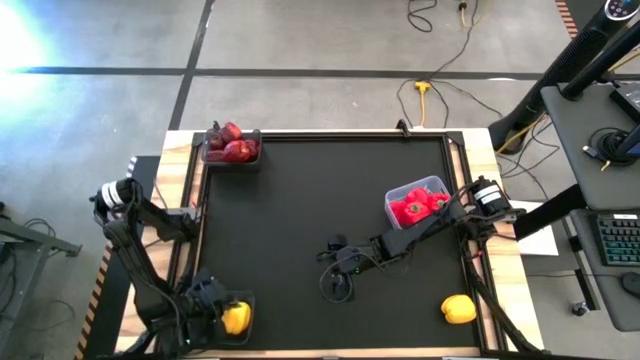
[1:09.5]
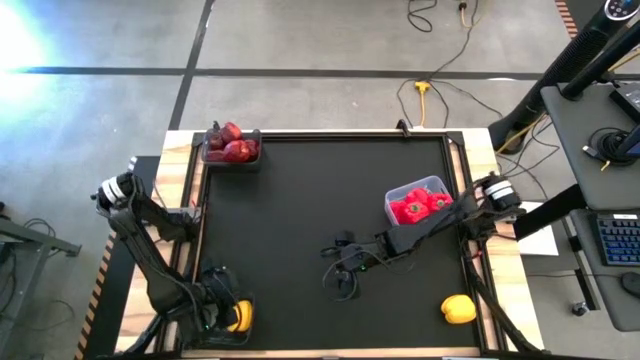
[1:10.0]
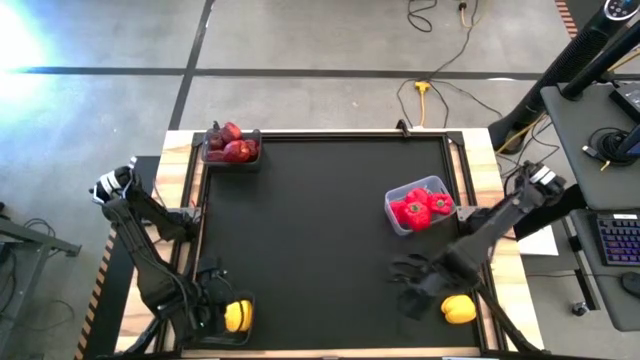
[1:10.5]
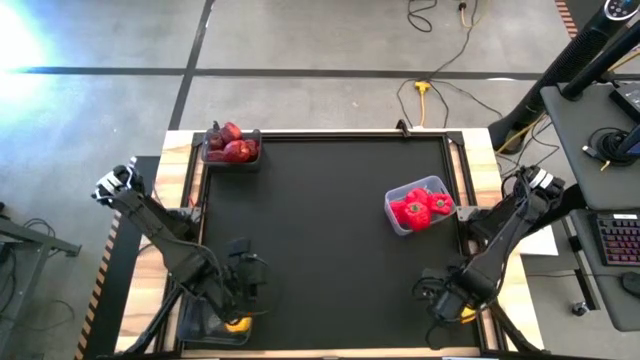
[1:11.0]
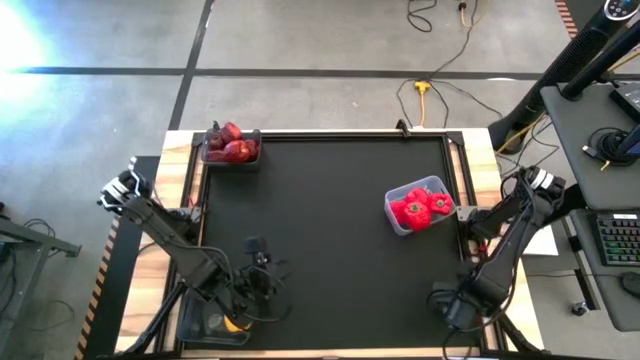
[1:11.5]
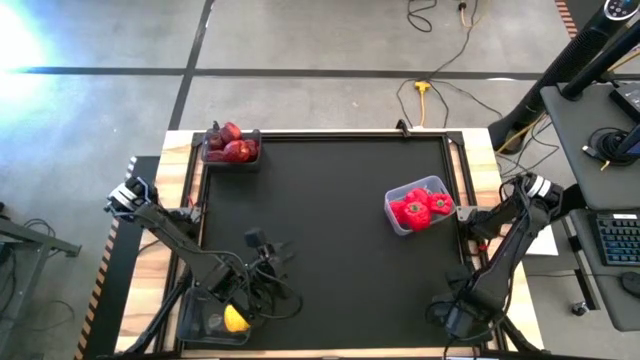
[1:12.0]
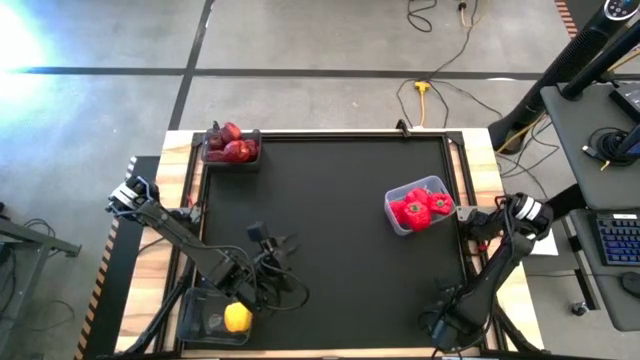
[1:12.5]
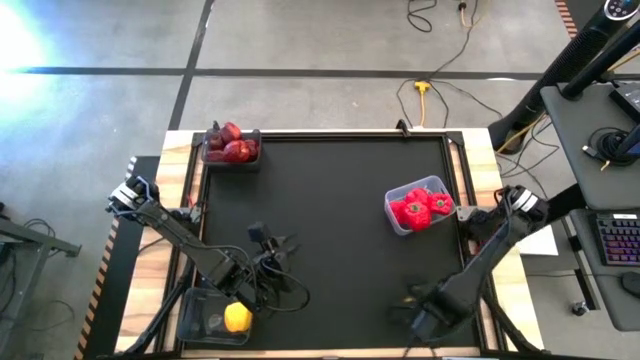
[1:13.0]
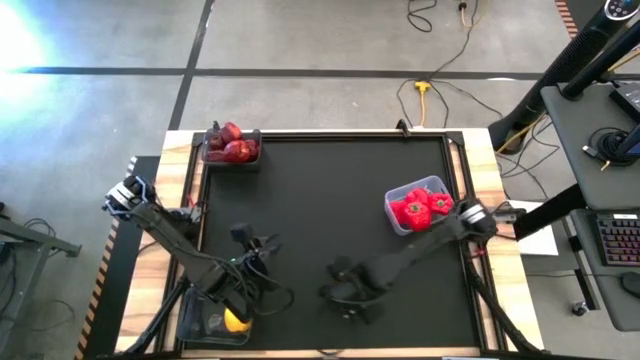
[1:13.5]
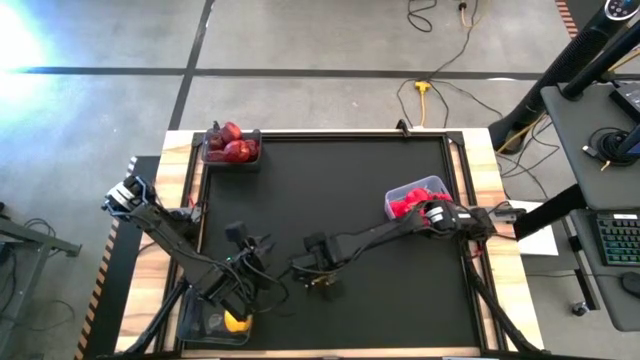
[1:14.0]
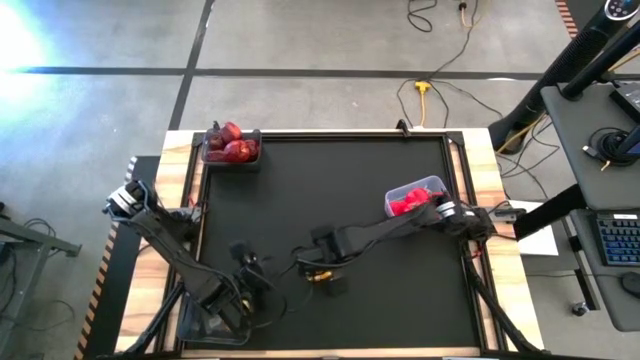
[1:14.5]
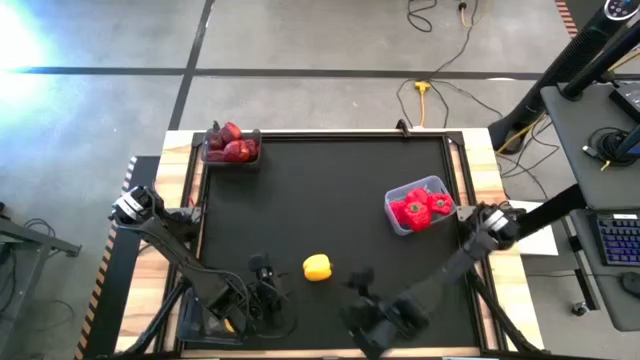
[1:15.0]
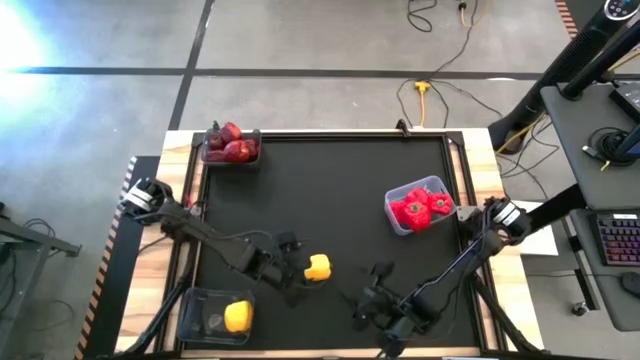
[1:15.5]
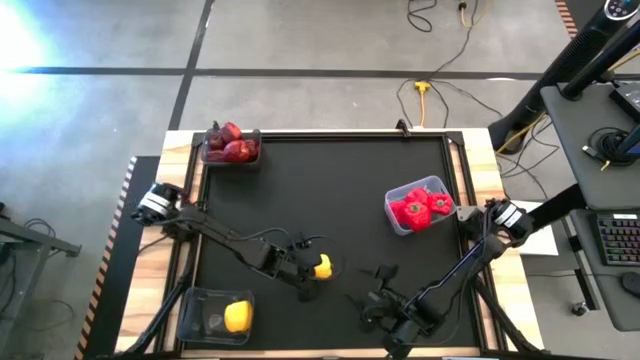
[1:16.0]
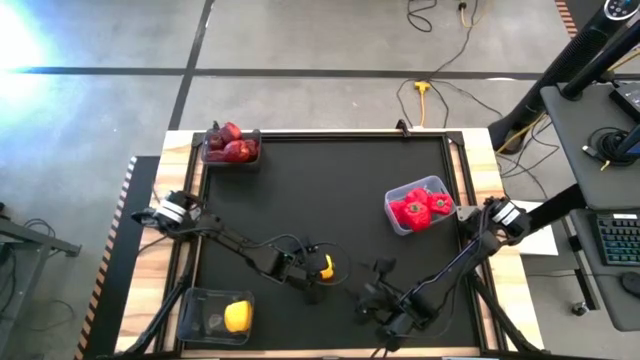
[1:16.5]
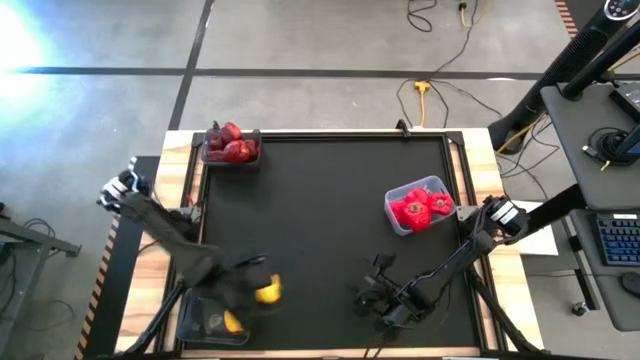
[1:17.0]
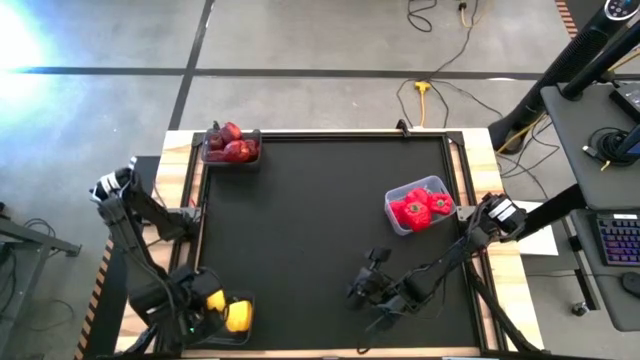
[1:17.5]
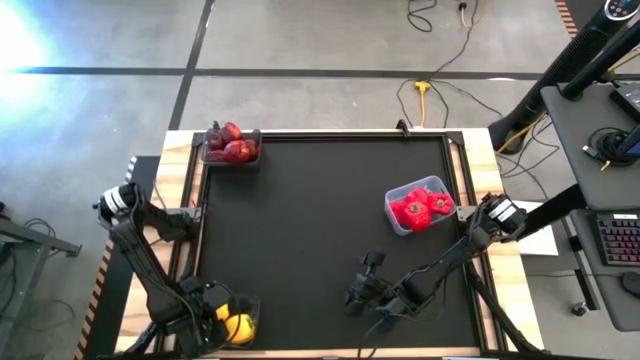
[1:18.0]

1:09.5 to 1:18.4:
Task: Sort produce into baskets
Put the yellow bell pepper into the bottom black bin

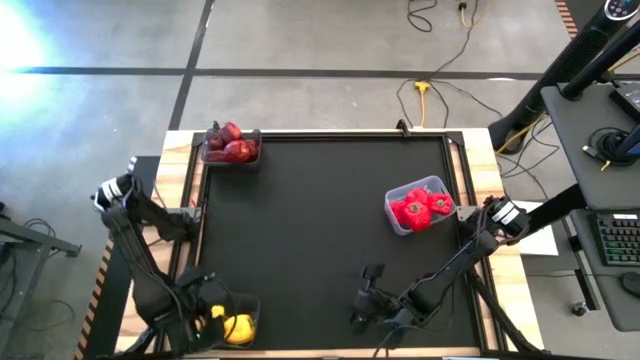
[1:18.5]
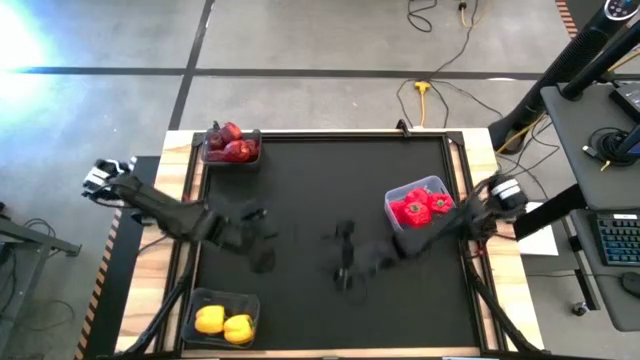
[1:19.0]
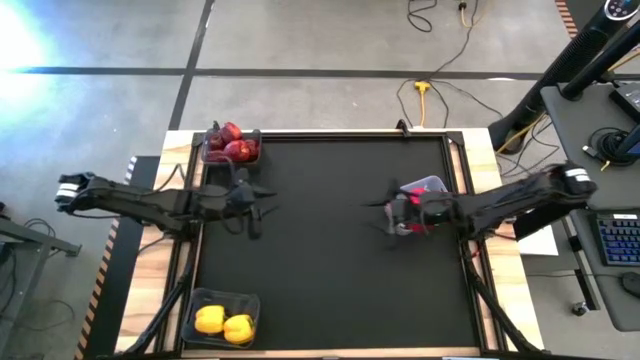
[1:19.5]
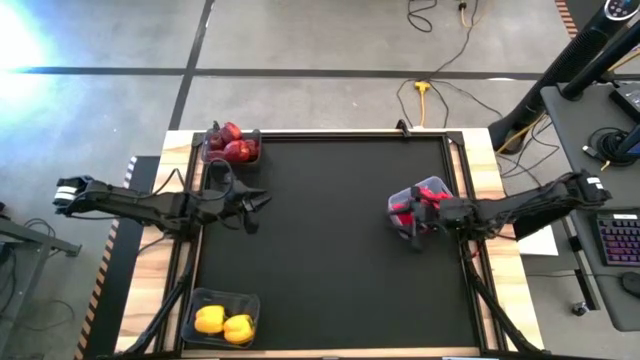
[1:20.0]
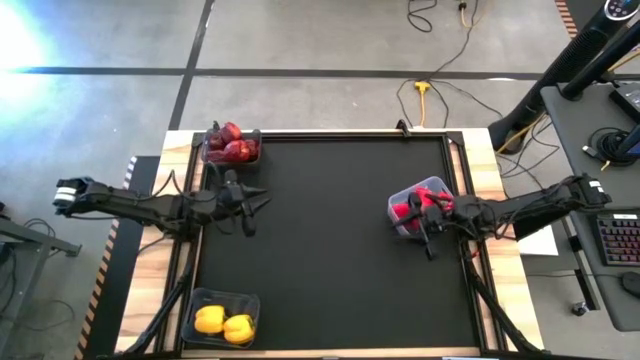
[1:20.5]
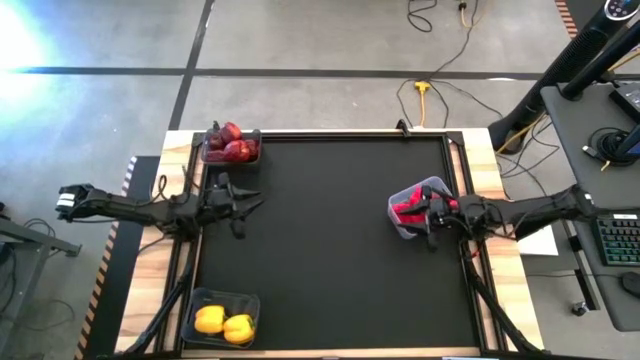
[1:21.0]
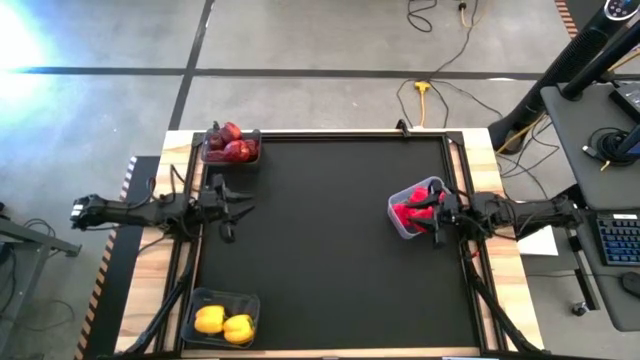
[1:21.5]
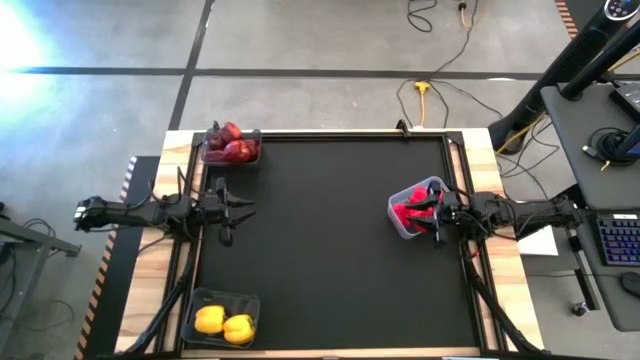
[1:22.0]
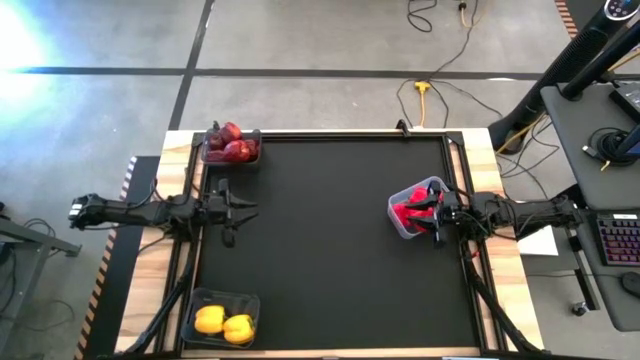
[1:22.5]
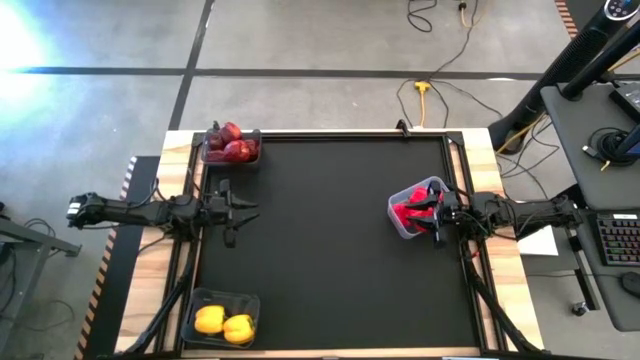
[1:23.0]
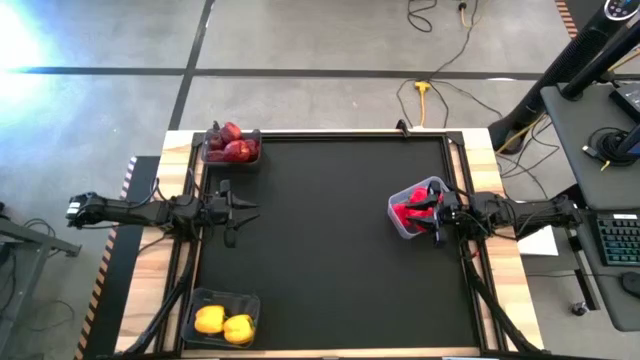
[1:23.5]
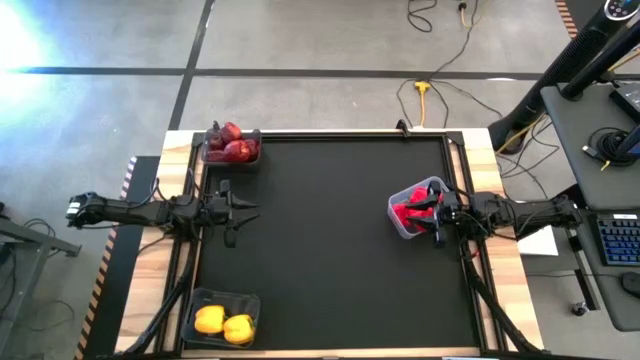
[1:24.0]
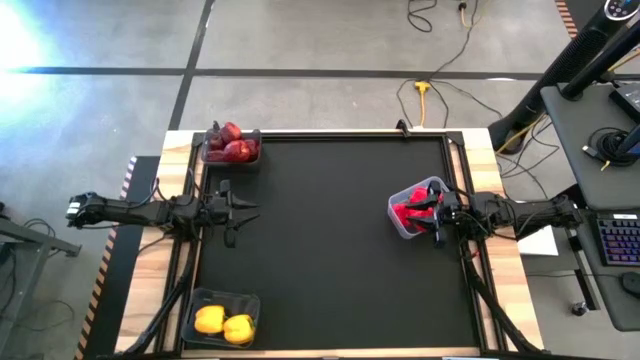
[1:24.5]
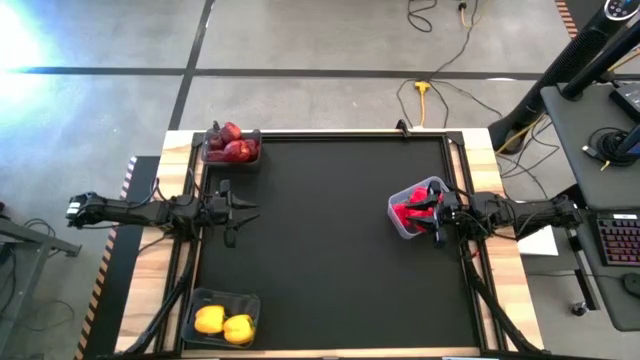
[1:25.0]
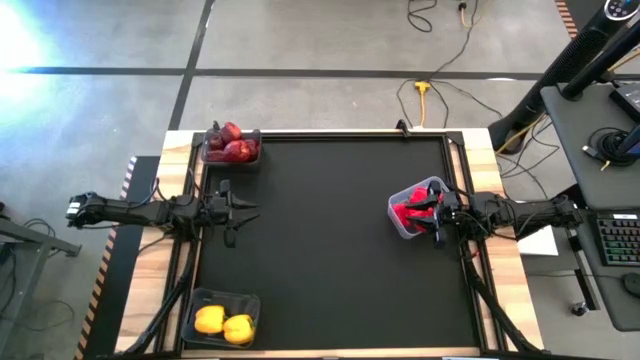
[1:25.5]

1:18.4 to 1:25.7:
Return to home position

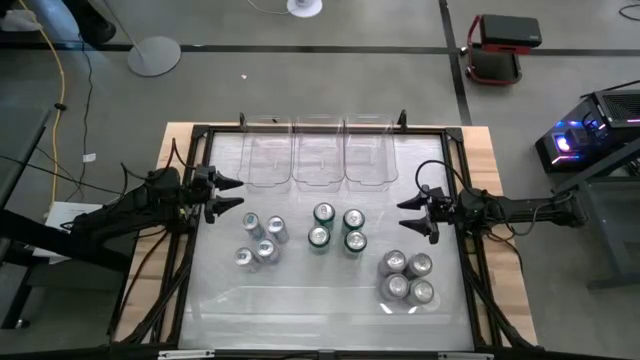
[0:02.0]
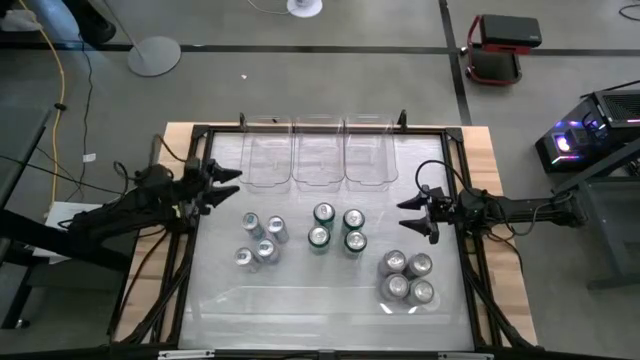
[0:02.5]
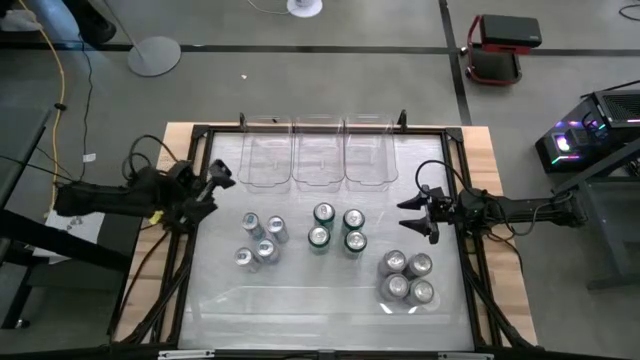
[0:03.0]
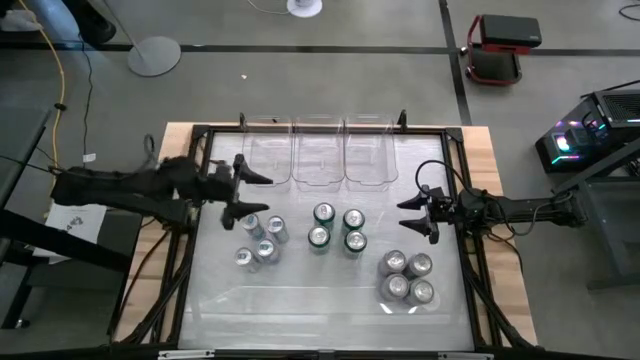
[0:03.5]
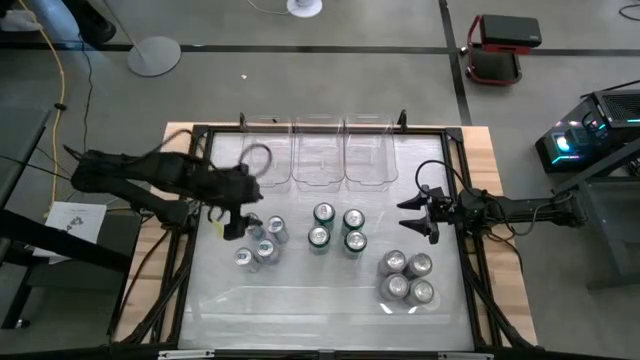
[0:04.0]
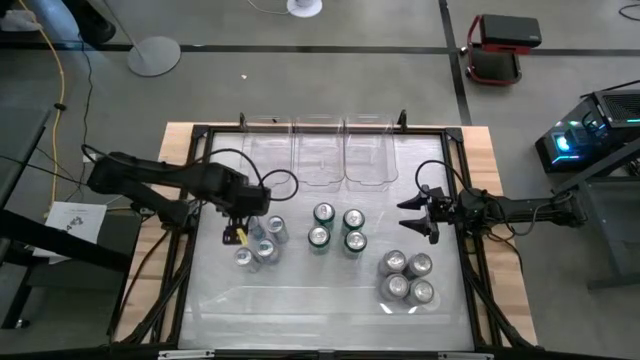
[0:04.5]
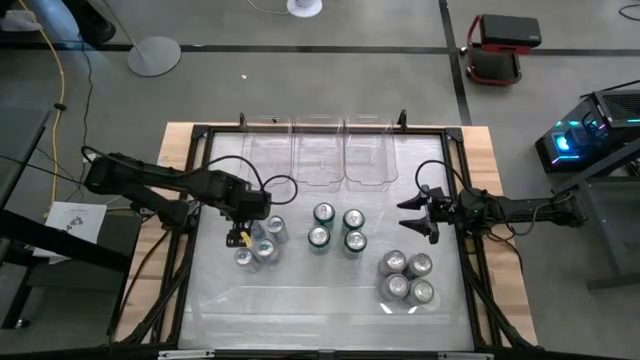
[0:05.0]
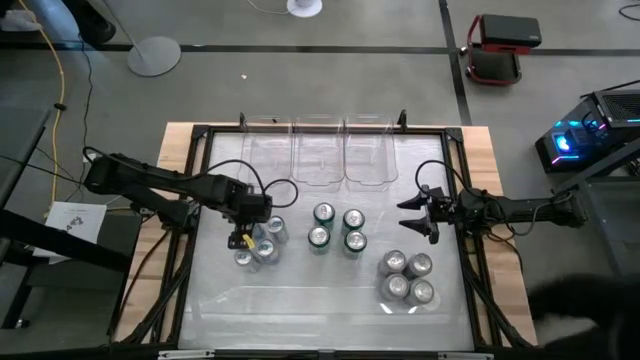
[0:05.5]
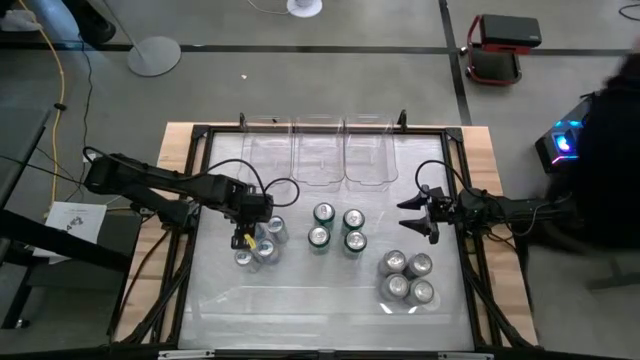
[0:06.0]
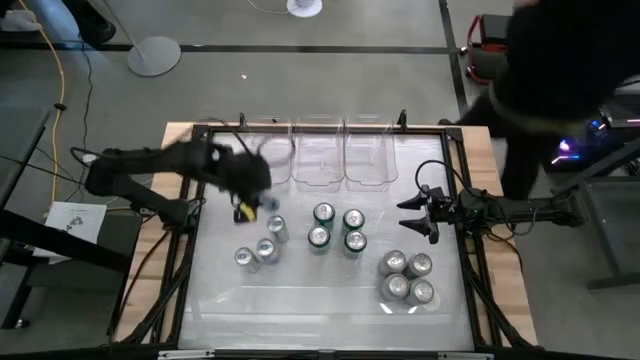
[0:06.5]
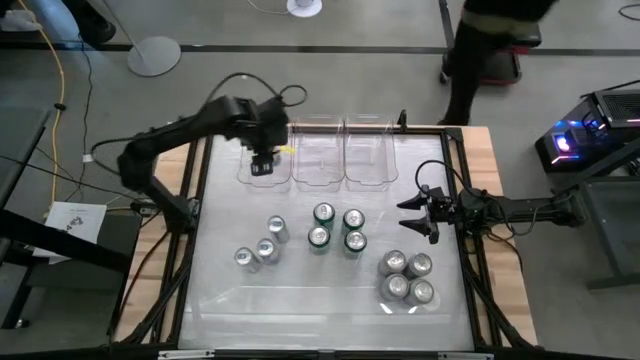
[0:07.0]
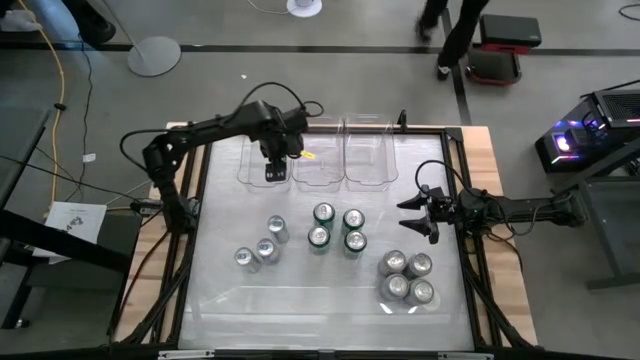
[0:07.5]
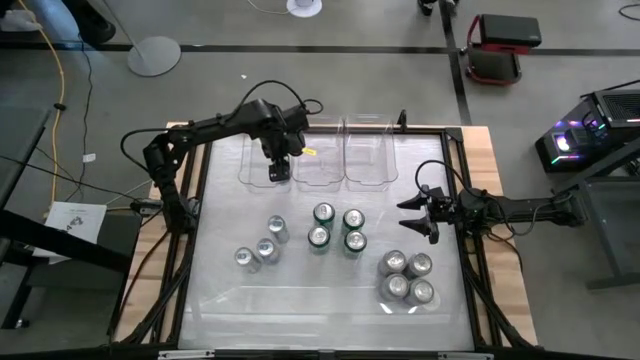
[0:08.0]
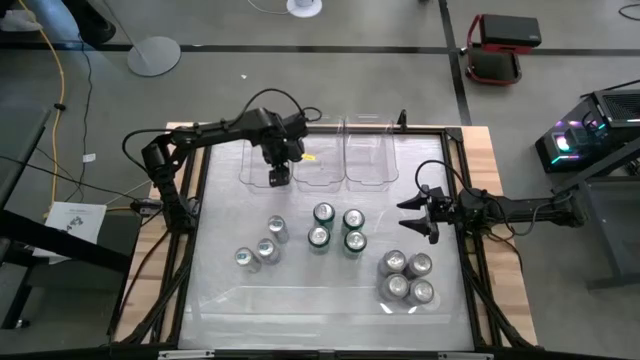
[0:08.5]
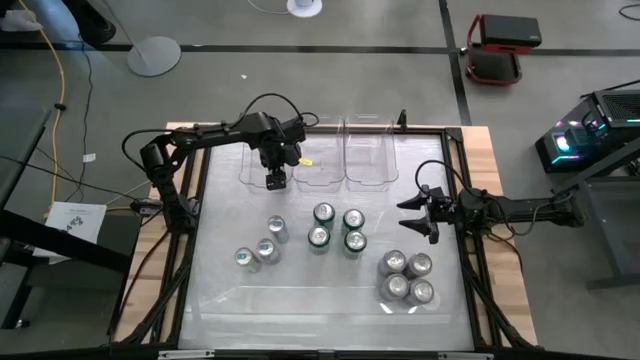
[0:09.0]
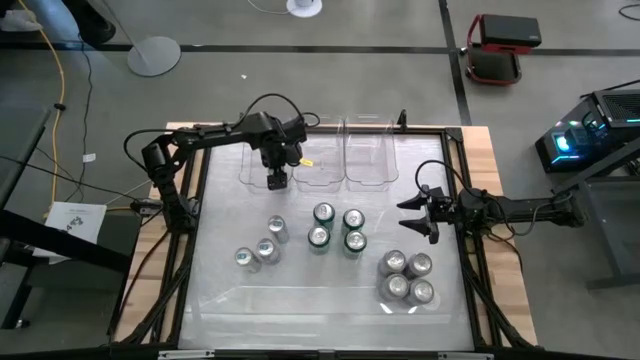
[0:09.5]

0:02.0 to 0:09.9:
Task: Sort soda cans
Put the top left blue soda can into the left transparent bin
